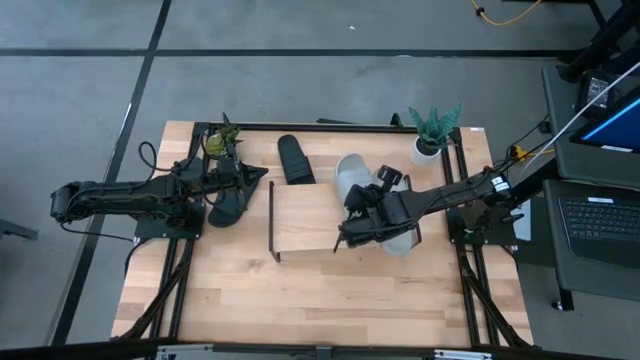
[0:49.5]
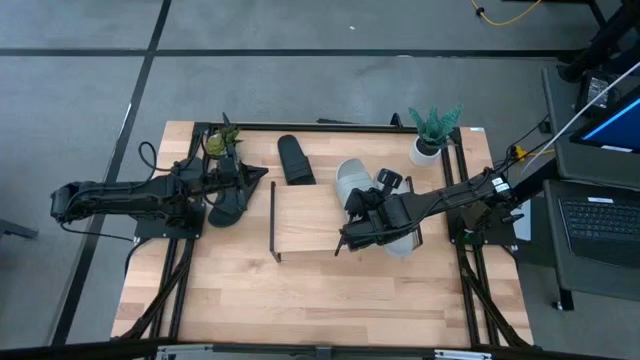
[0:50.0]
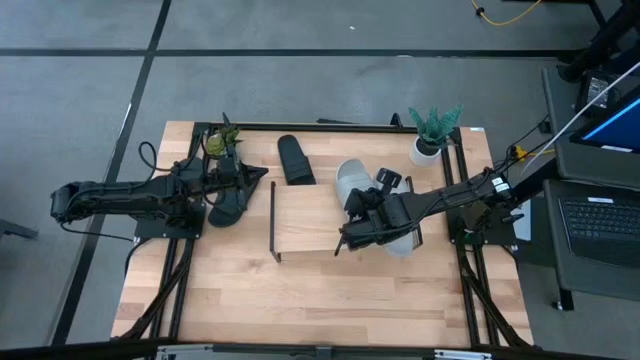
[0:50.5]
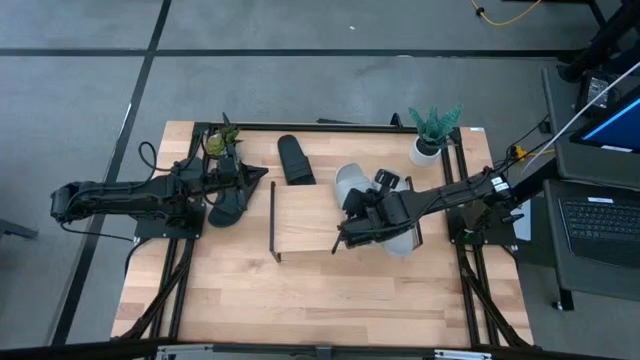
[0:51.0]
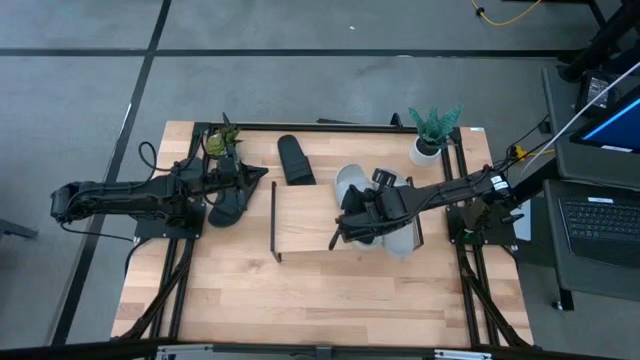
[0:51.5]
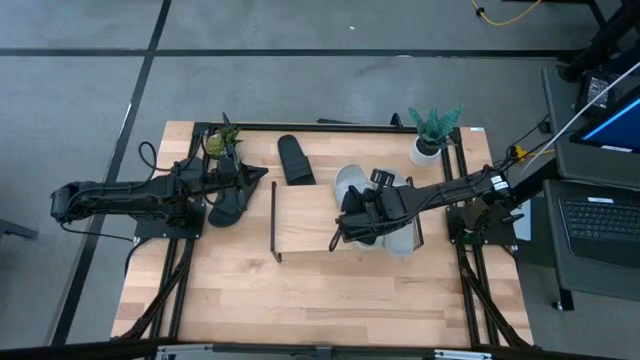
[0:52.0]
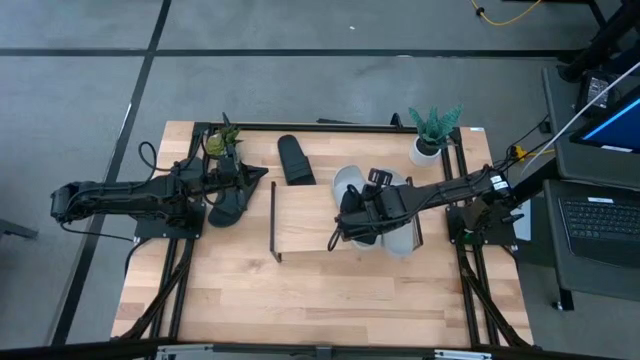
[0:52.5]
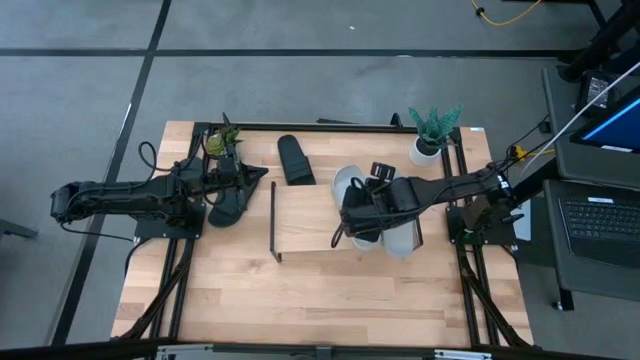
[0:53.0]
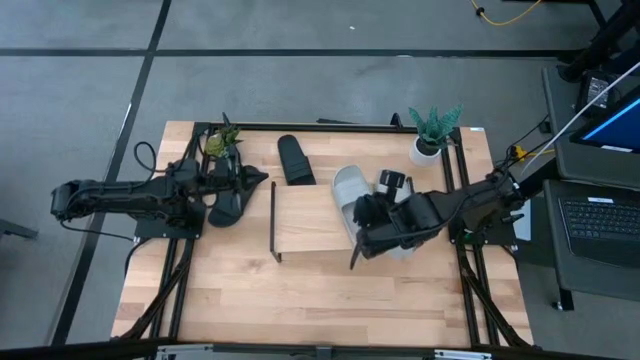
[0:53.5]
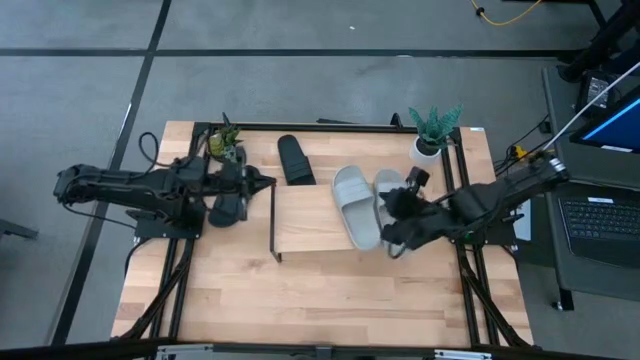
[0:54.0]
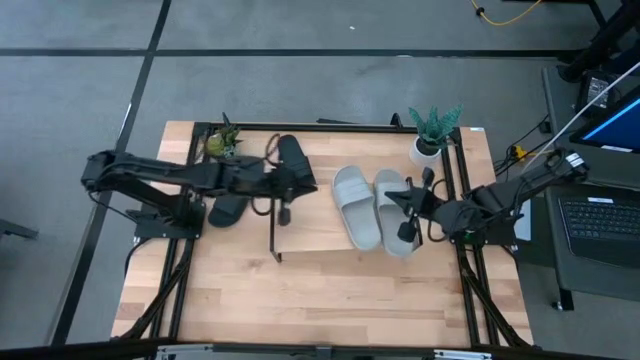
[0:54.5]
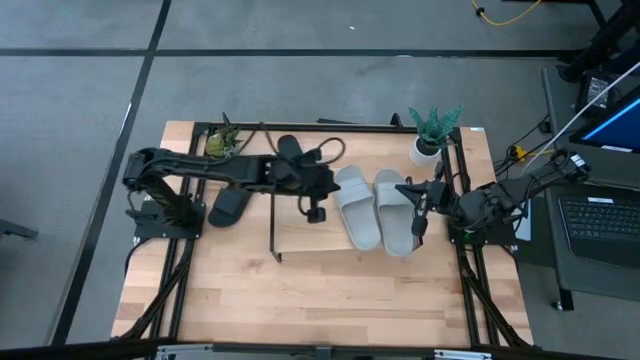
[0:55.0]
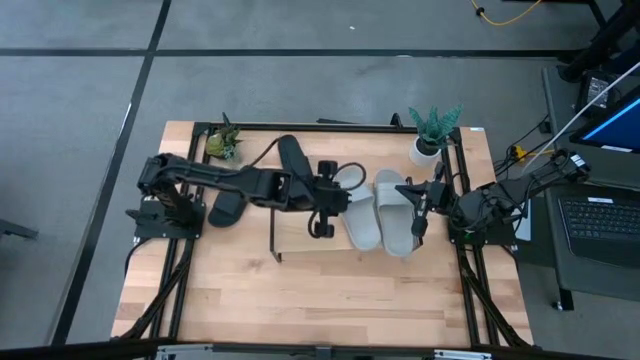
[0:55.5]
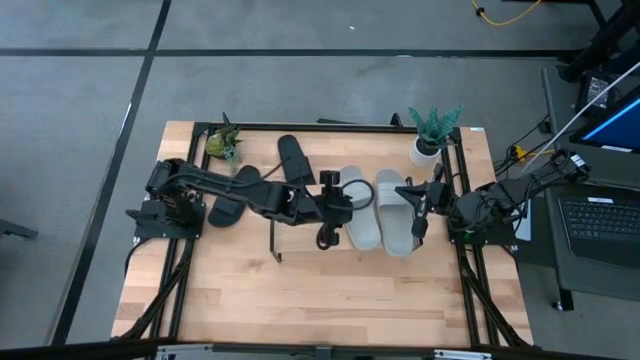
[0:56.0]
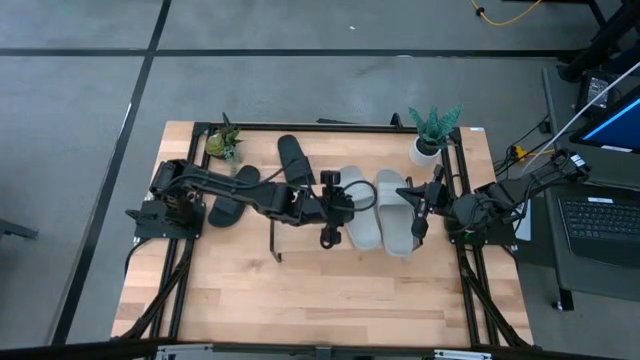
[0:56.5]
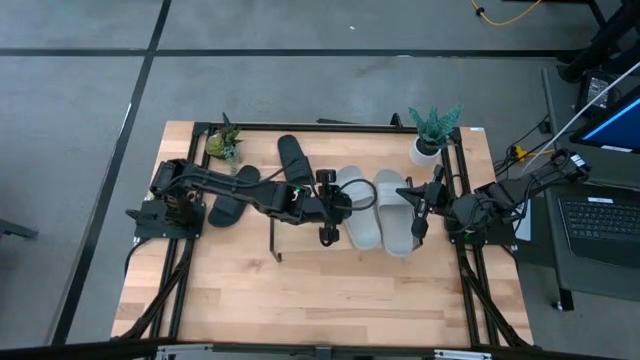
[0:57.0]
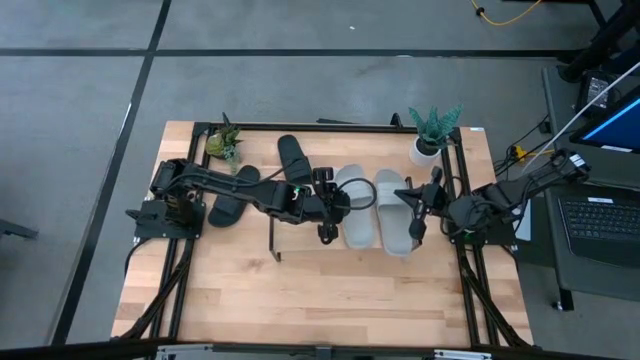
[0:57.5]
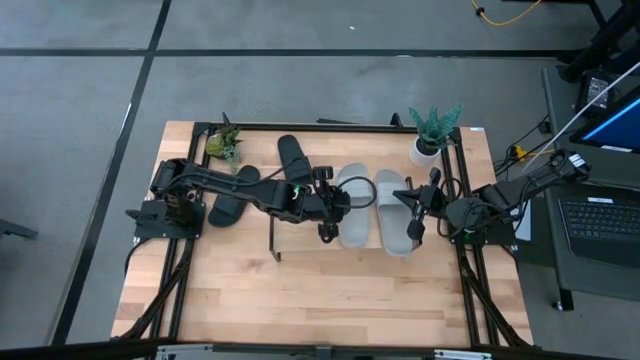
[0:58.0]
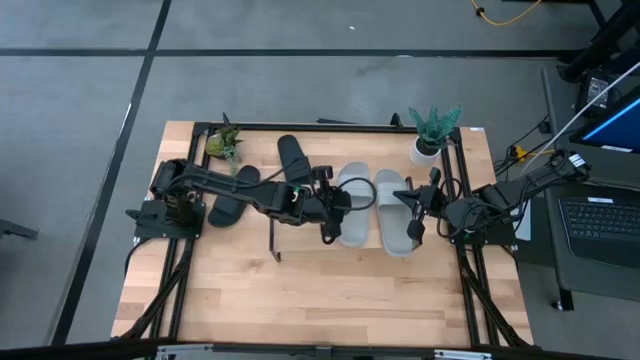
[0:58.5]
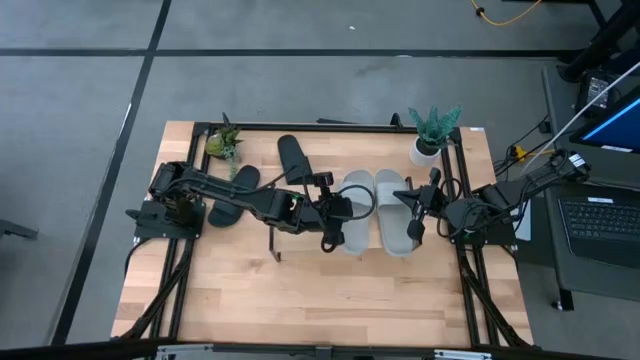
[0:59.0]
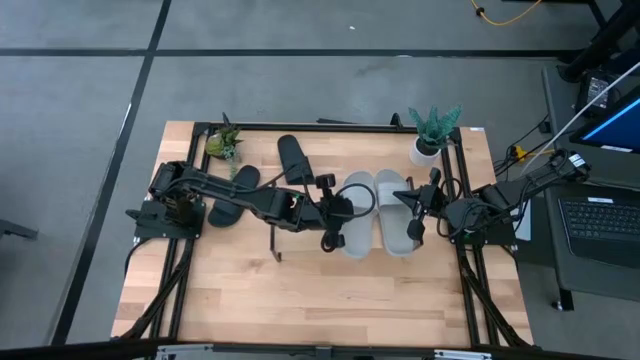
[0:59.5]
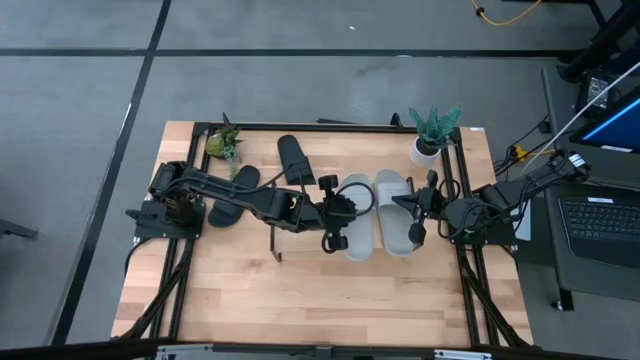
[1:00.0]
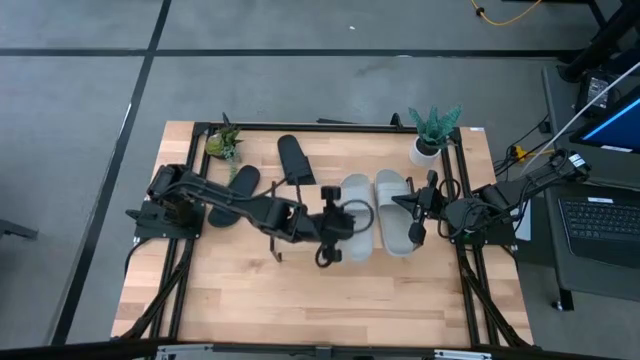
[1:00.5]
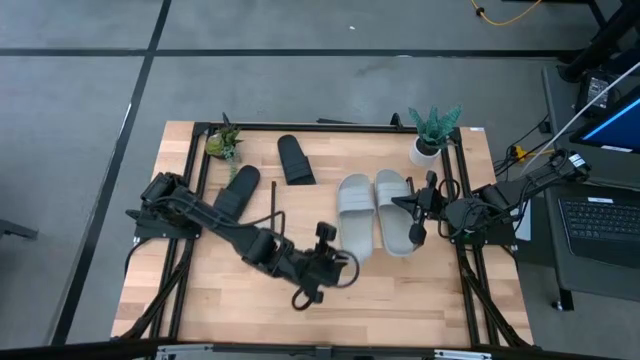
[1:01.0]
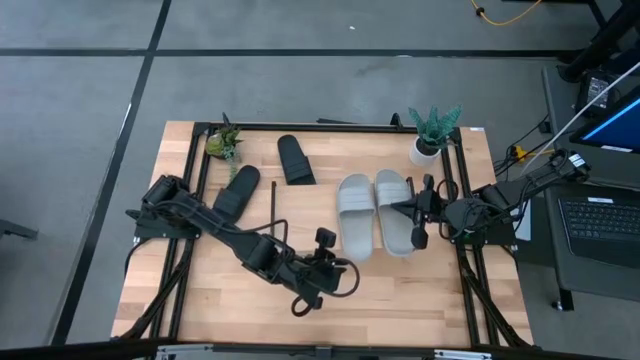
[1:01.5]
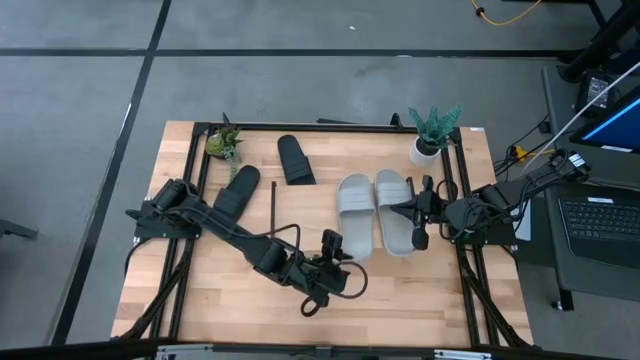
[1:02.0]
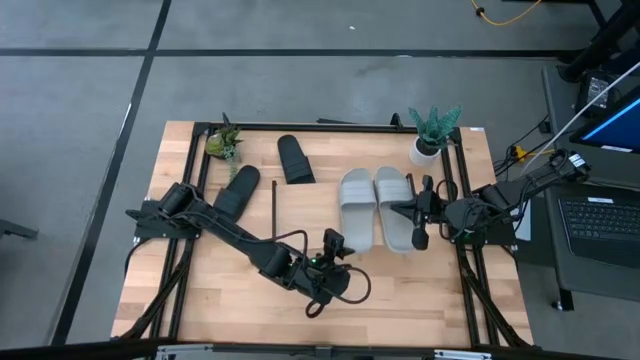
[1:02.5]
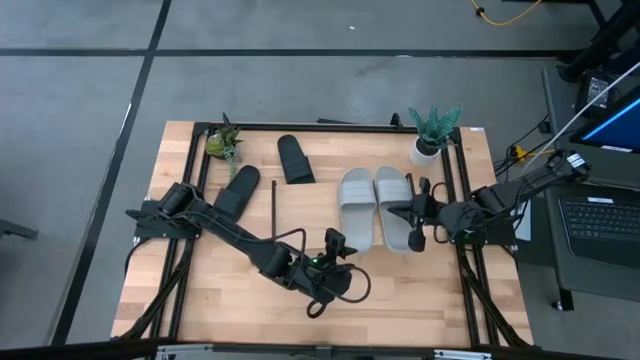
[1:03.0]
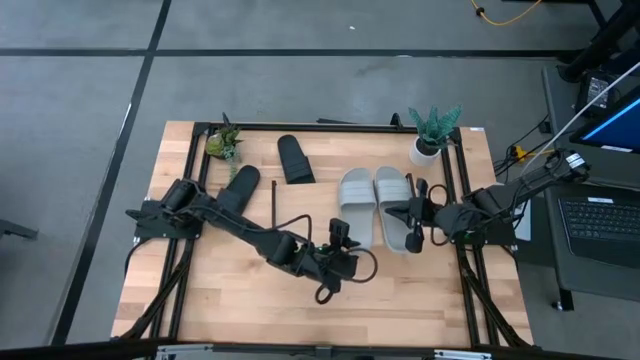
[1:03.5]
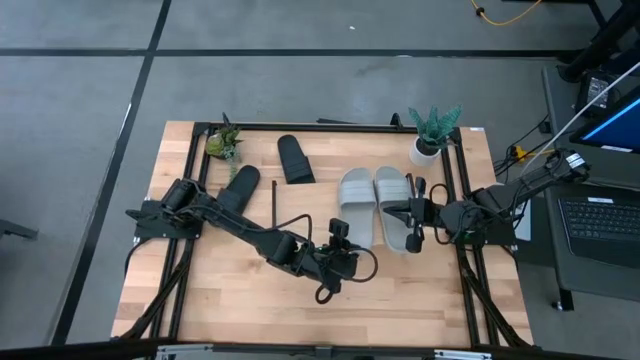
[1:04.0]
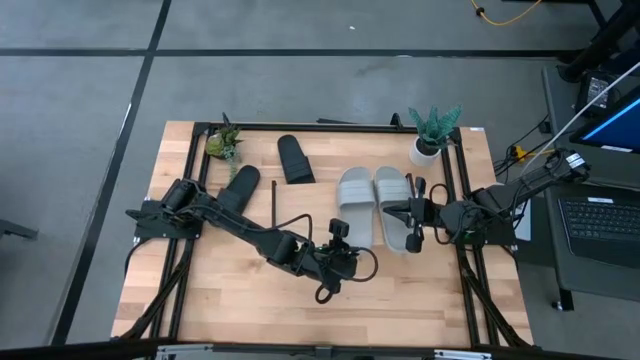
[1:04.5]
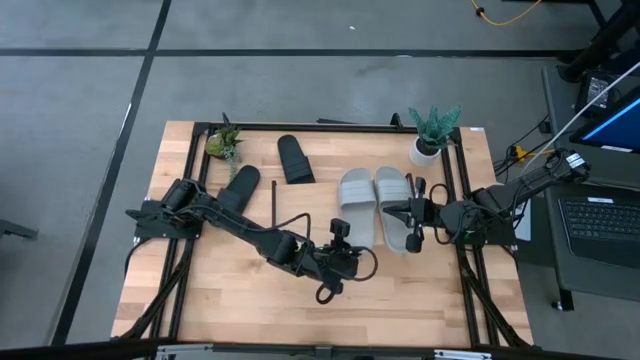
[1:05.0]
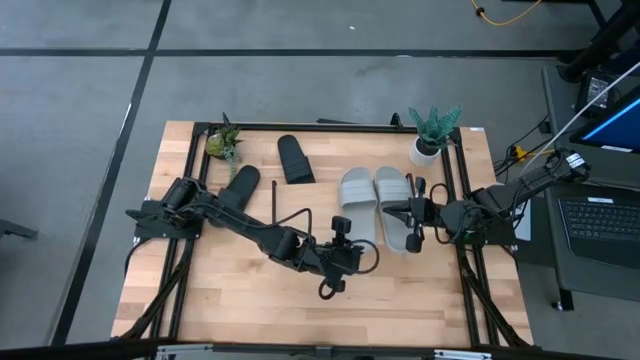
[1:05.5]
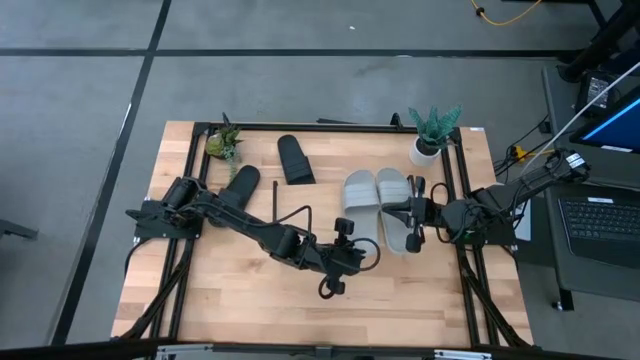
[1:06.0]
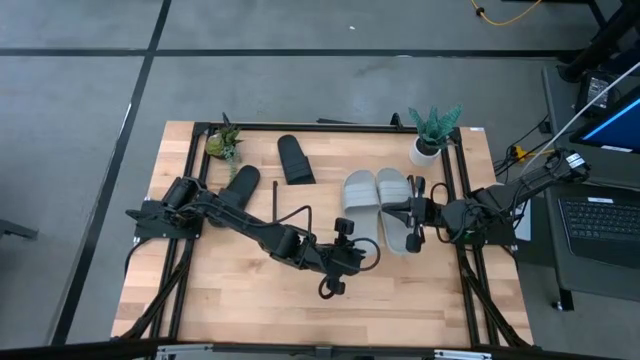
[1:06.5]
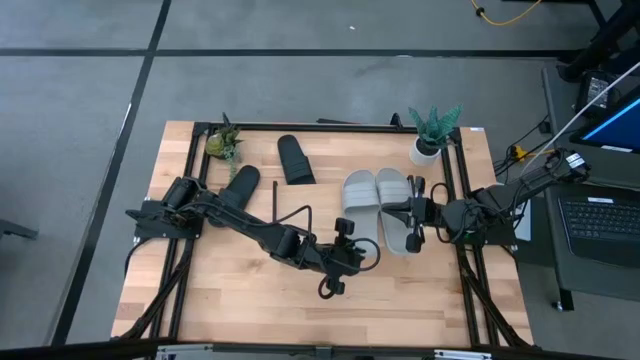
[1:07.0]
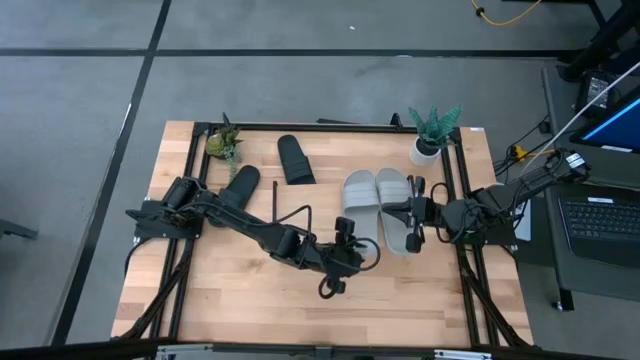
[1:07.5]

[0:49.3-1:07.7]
Task: Pick and place slides into the shelf
Put the top gray slide on the shelf

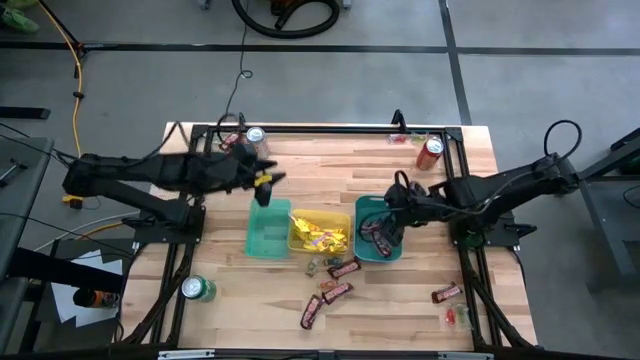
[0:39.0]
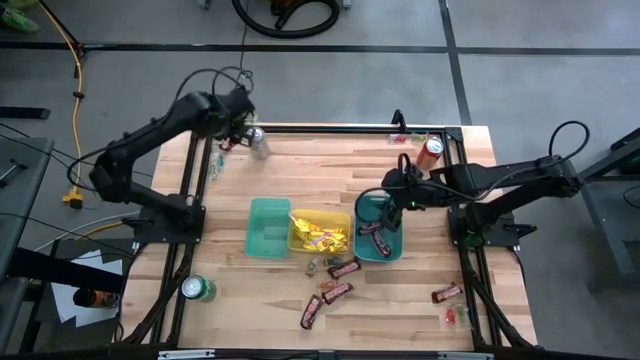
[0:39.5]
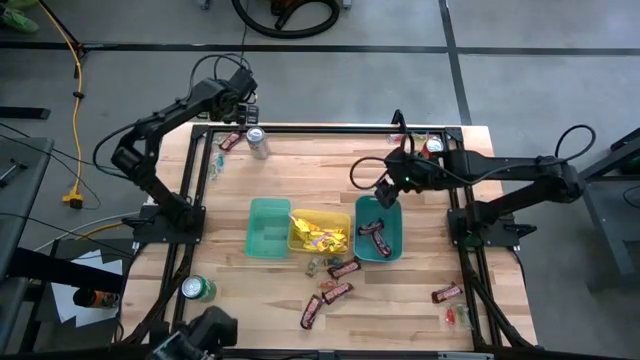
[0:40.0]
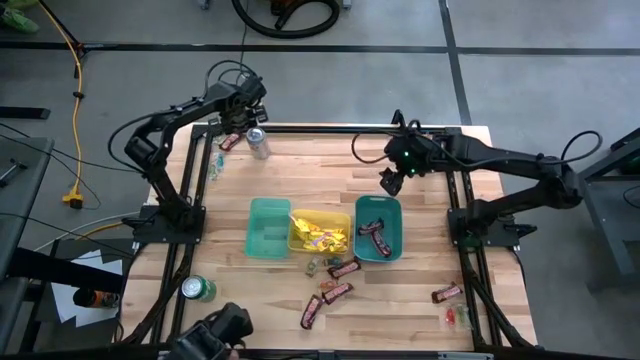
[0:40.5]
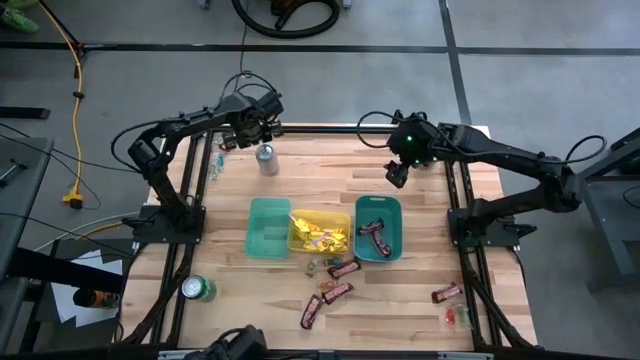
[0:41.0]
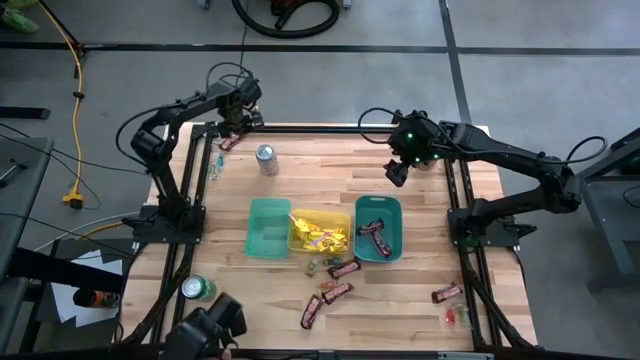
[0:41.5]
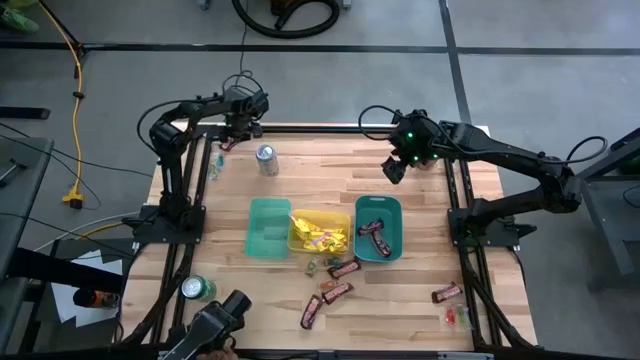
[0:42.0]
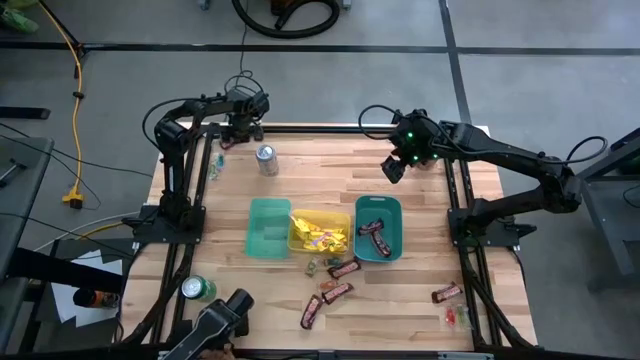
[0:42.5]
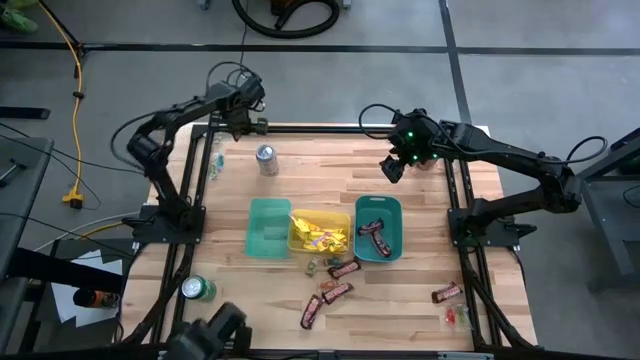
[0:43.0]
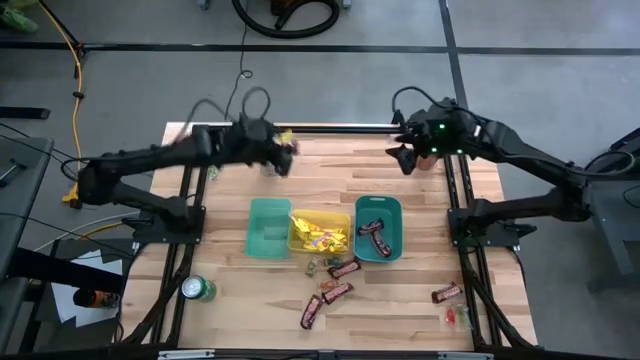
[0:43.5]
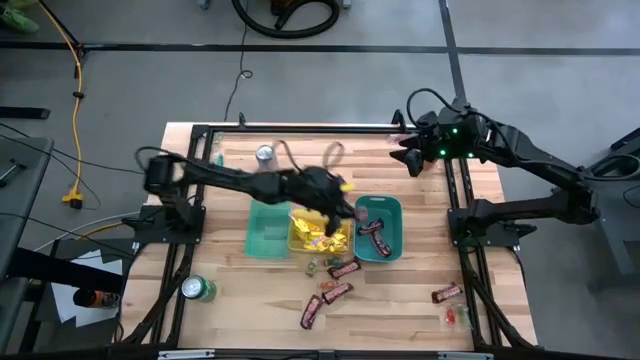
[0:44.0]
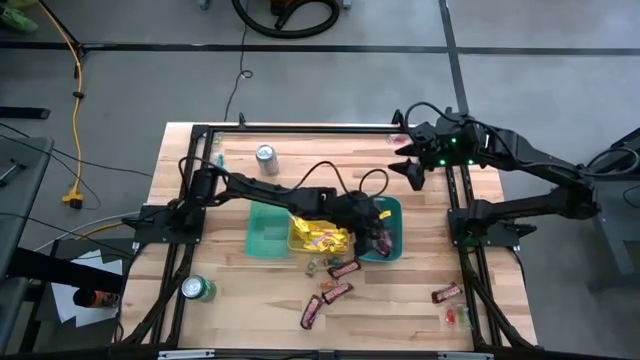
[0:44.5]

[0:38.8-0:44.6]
Task: Sort candy
Put the brown chocolate bar into the blue bin
